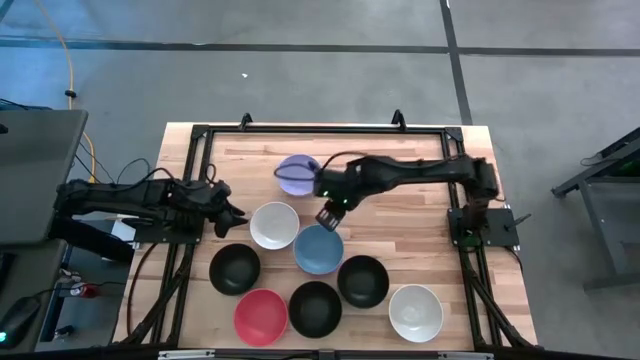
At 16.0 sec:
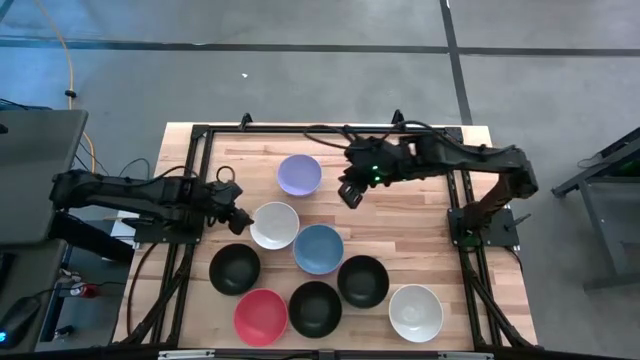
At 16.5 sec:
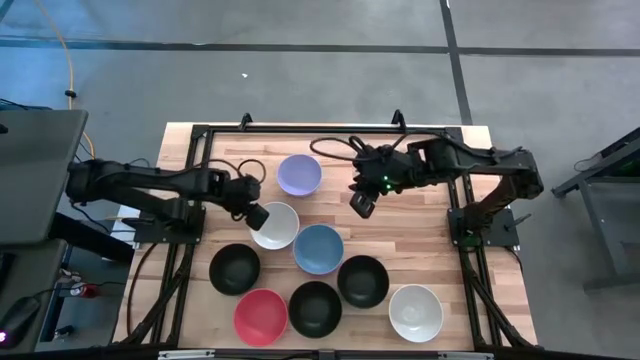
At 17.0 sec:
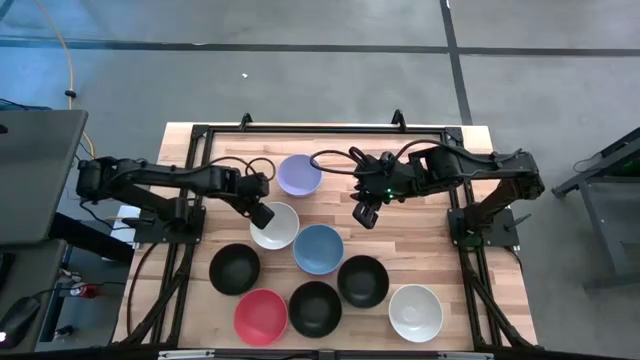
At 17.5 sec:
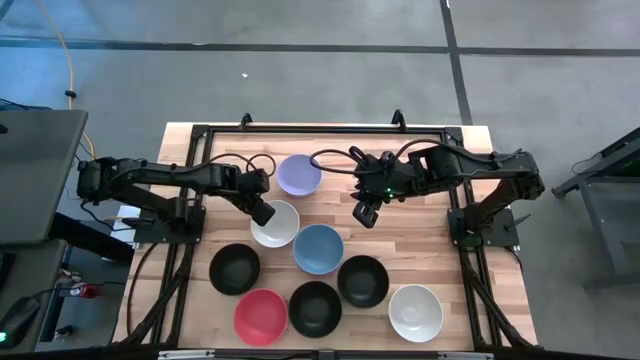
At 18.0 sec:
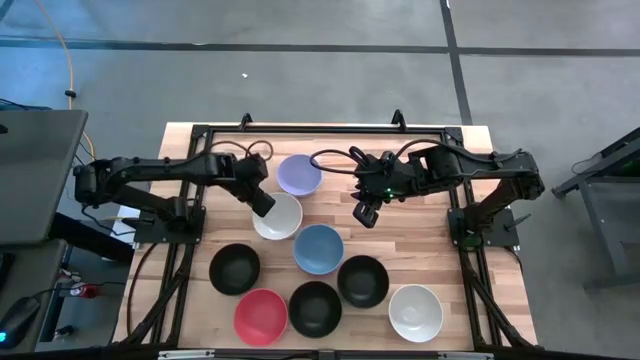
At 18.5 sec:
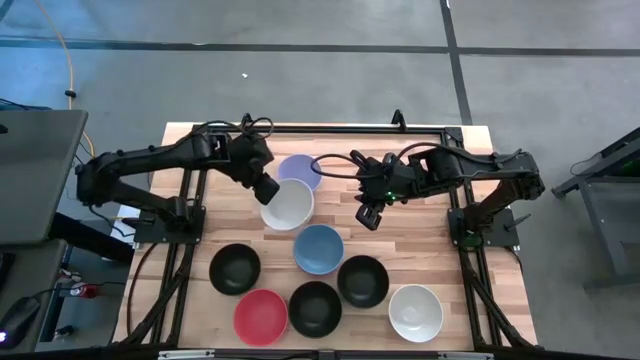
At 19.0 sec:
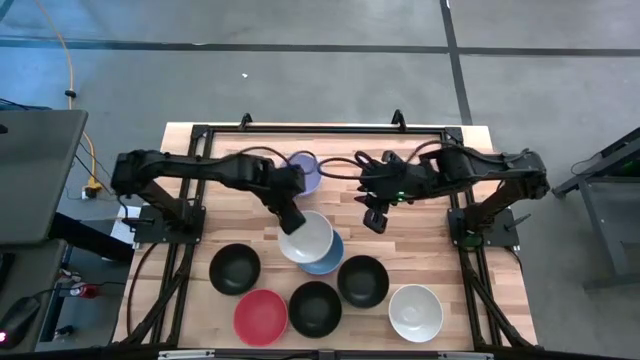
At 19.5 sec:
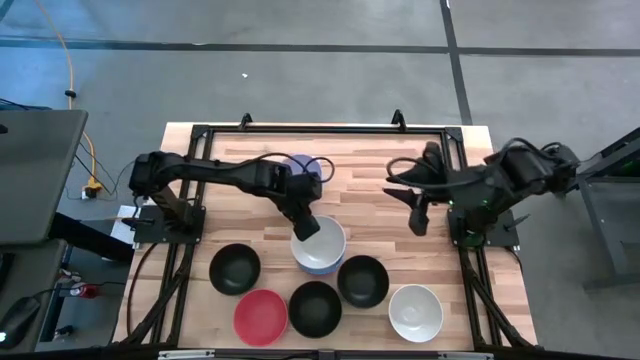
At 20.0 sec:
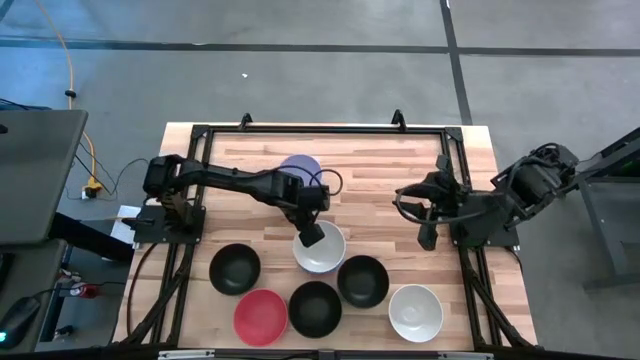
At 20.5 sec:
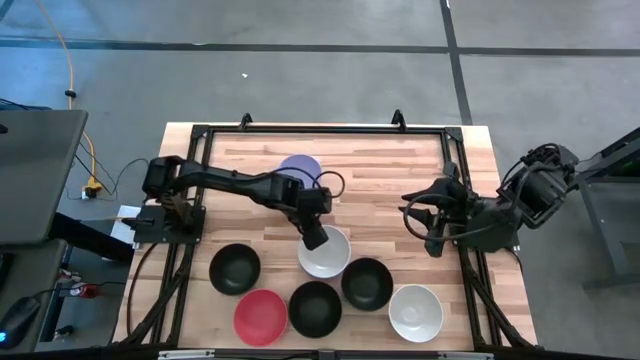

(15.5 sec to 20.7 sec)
Task: Nest bowls inside each other
Stack the top left white bowl on the blue bowl

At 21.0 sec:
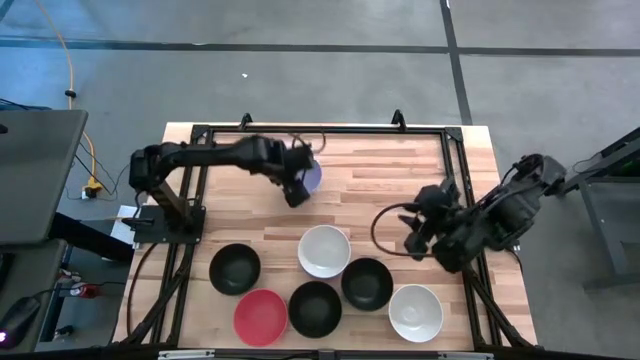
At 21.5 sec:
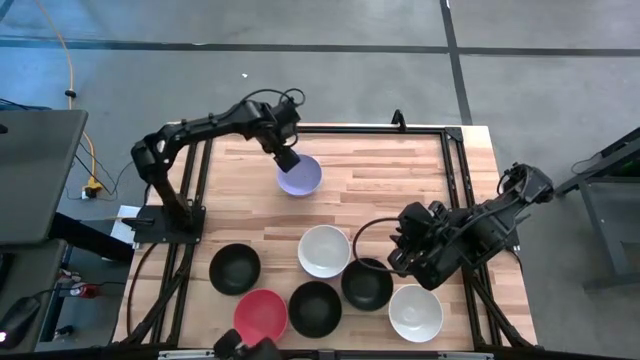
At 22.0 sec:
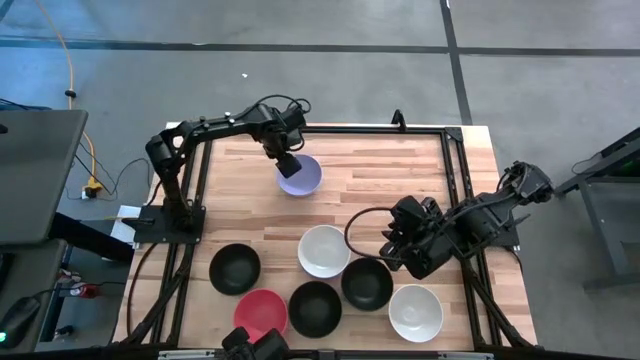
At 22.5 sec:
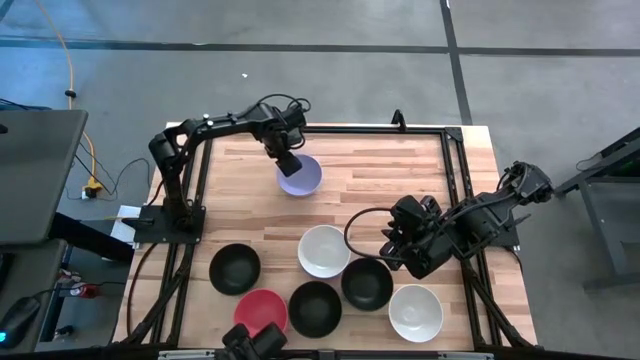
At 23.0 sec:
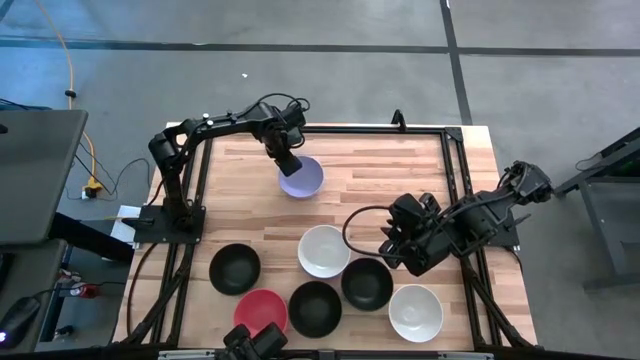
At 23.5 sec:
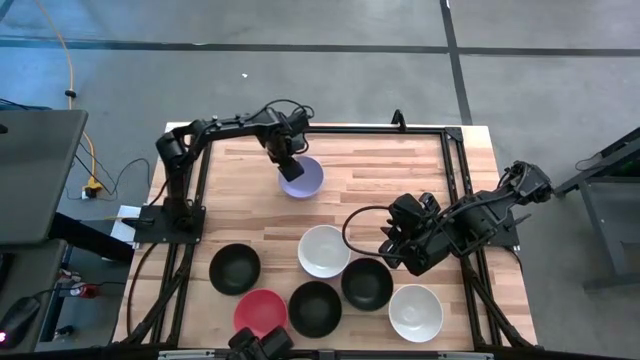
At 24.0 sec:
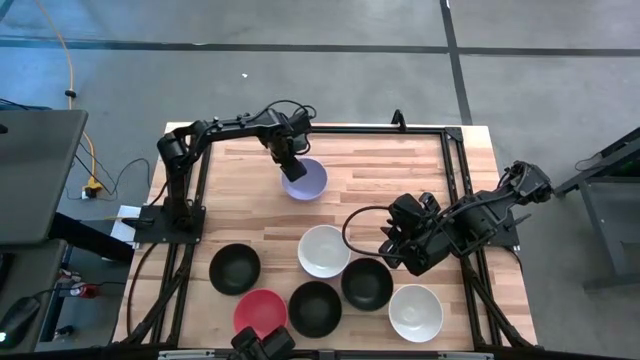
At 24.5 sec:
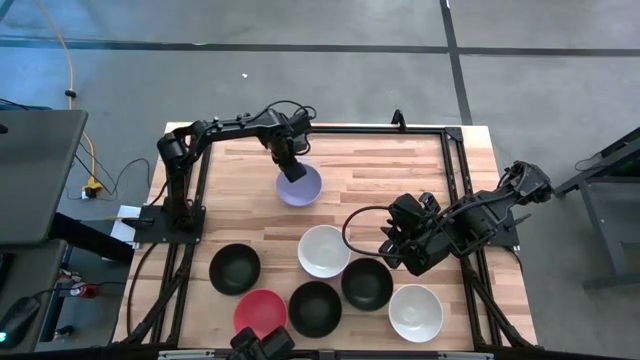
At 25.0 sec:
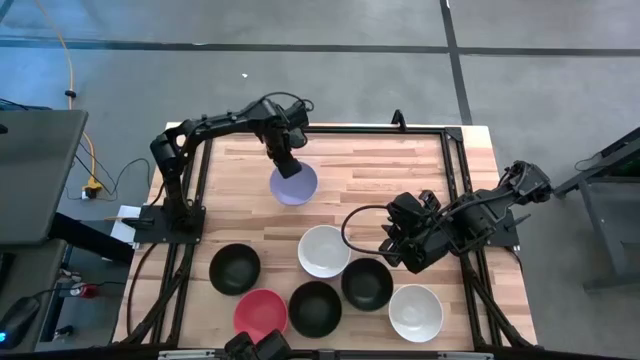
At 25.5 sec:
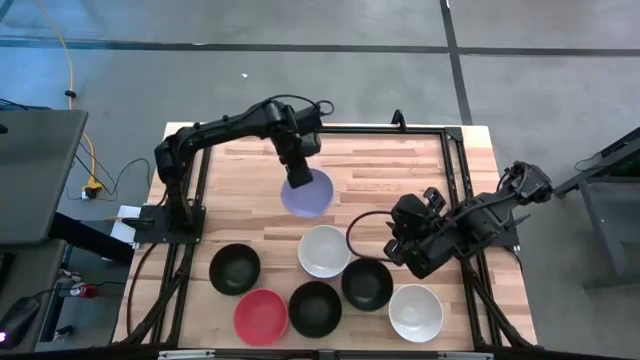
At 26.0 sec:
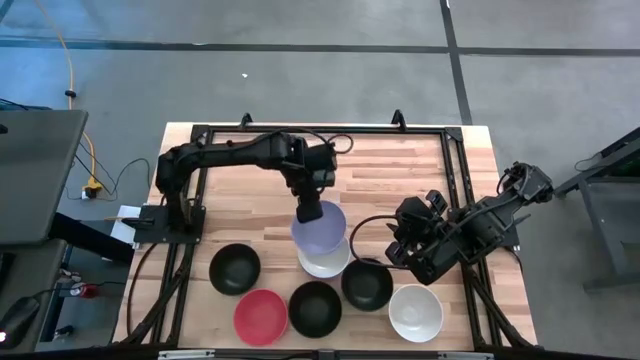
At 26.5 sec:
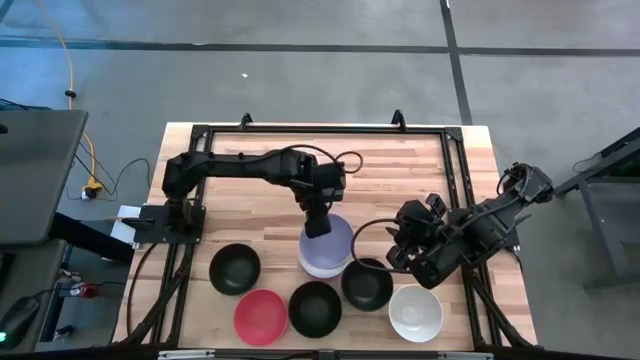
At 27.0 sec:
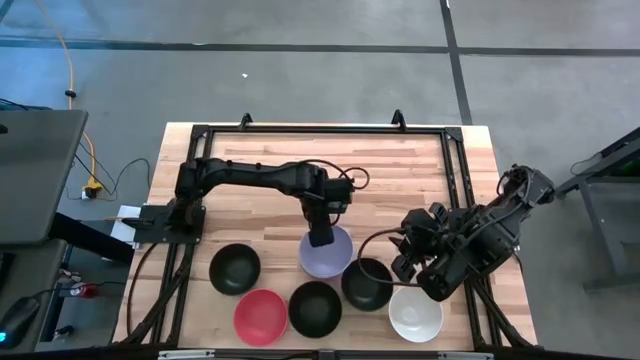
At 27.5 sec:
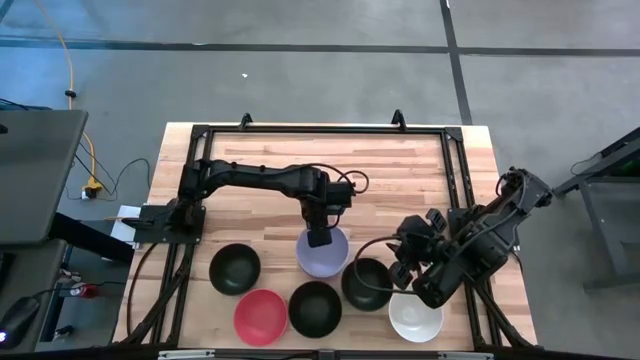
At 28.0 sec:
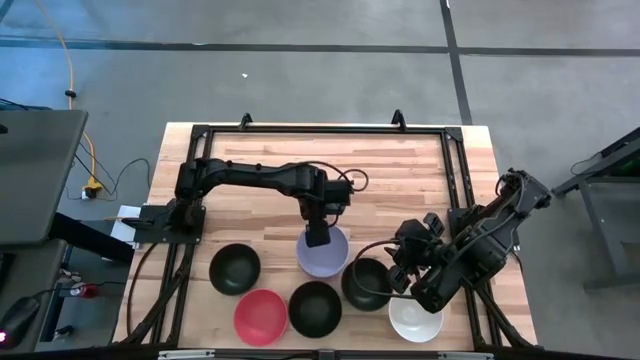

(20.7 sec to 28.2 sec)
Stack the light blue bowl on the white bowl

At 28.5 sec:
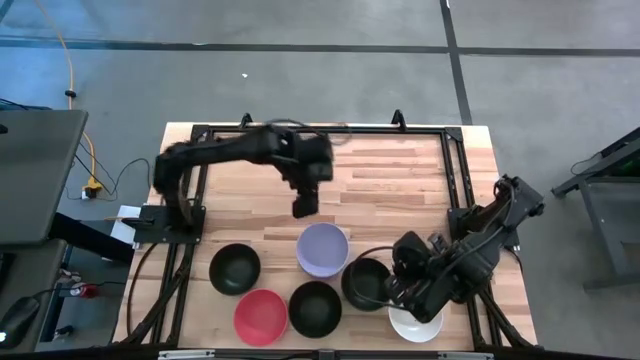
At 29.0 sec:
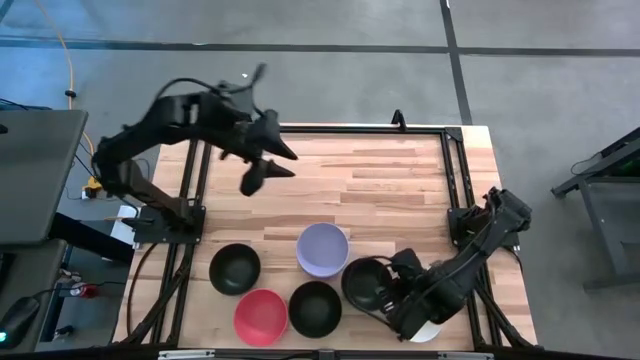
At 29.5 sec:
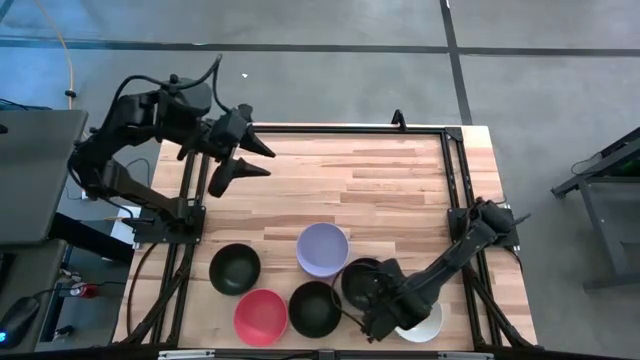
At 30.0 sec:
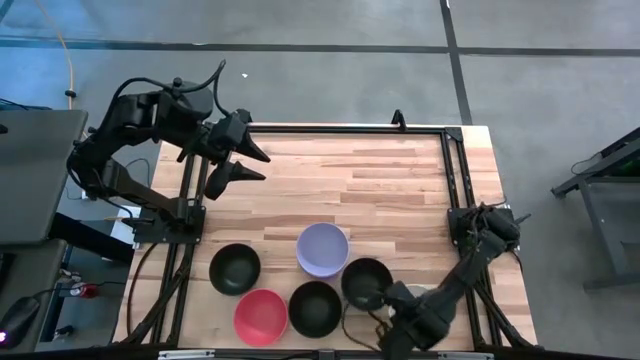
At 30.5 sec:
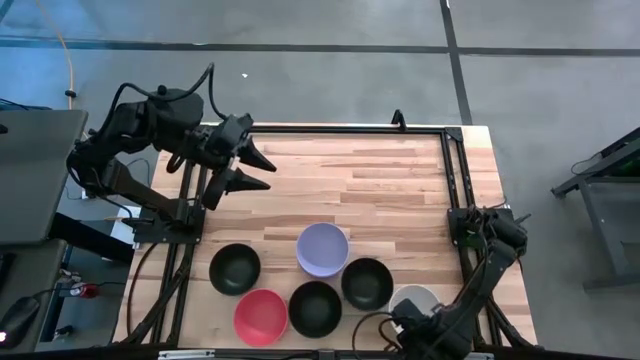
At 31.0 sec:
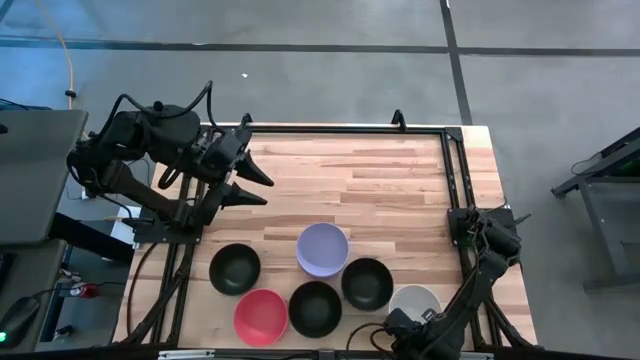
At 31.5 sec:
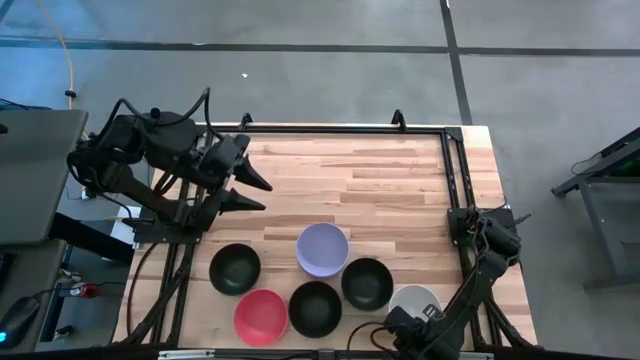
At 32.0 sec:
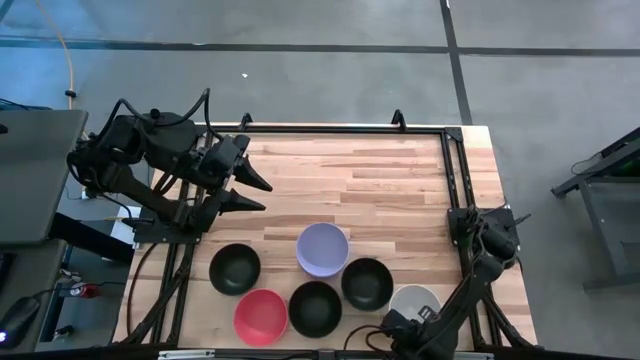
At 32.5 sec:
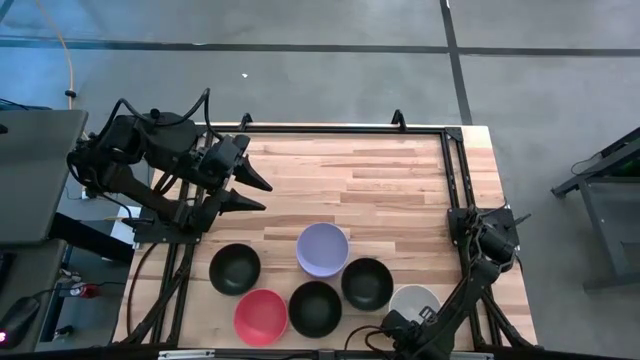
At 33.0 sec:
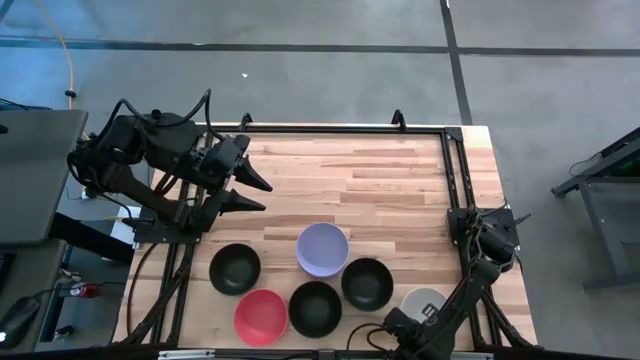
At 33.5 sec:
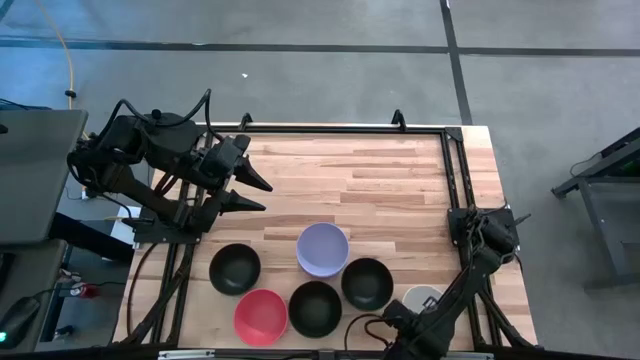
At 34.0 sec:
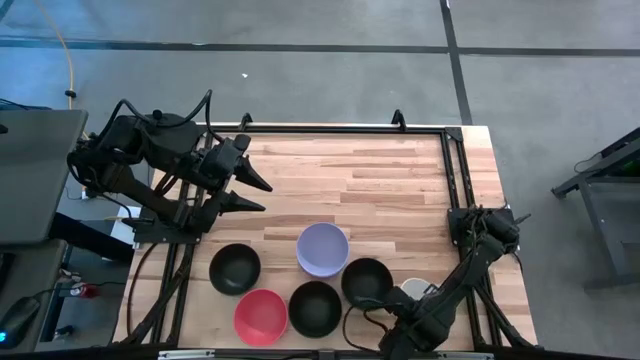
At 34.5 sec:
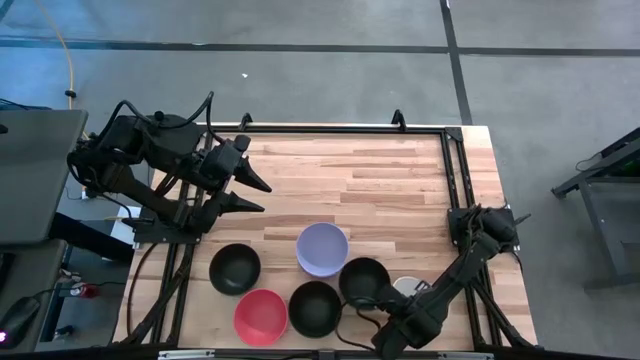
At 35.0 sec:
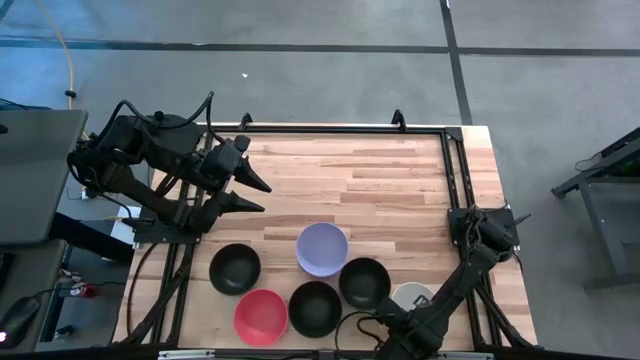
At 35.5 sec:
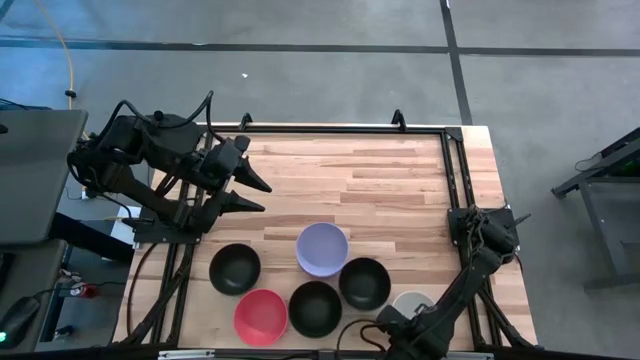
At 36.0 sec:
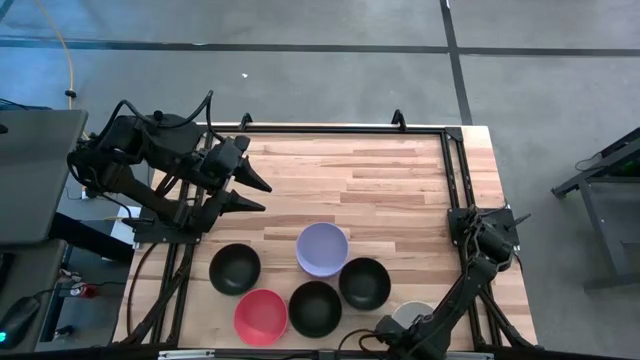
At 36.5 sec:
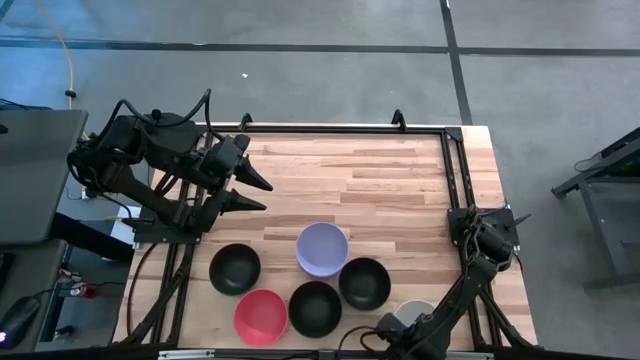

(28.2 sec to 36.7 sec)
Stack the white bowl on the light blue bowl
